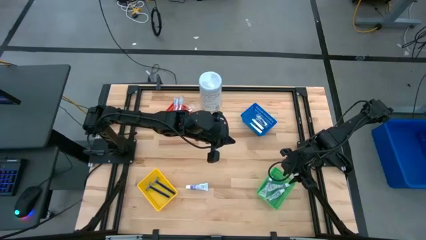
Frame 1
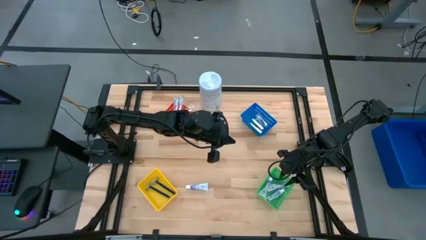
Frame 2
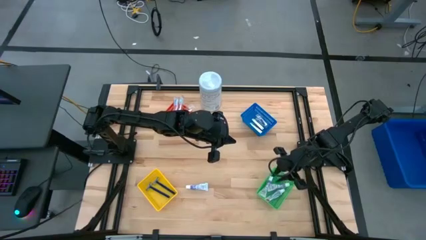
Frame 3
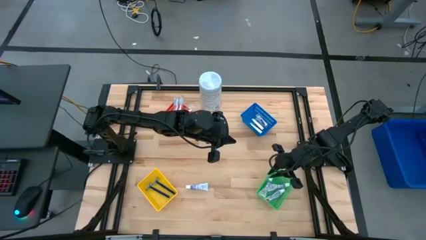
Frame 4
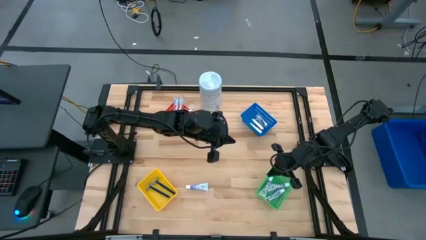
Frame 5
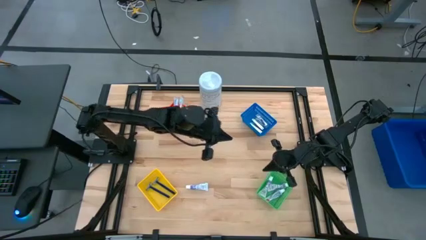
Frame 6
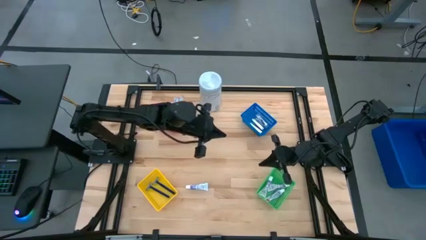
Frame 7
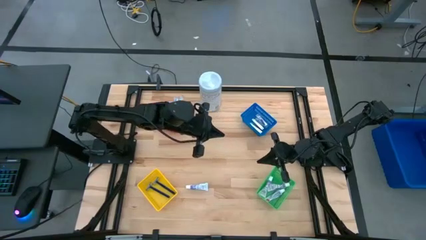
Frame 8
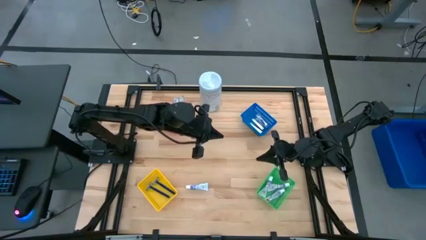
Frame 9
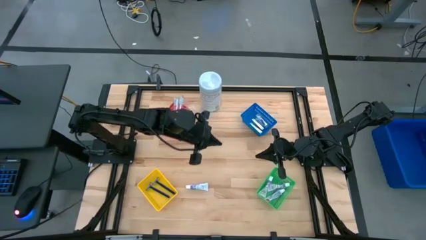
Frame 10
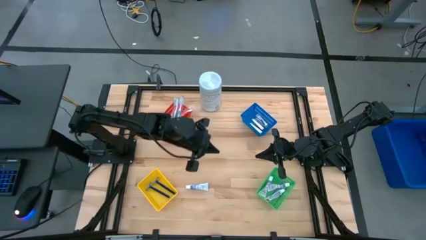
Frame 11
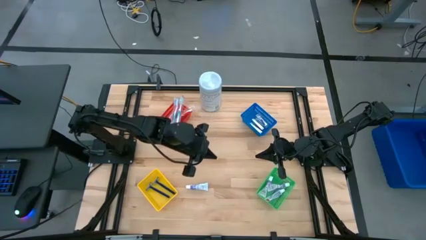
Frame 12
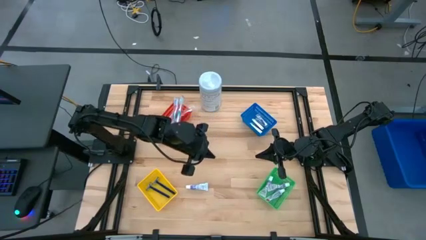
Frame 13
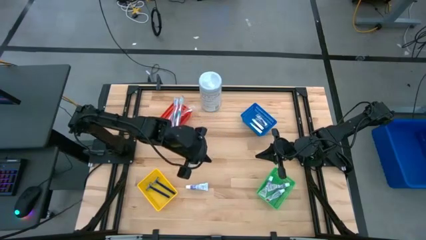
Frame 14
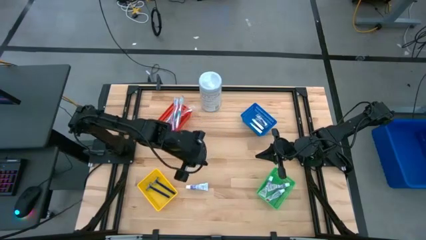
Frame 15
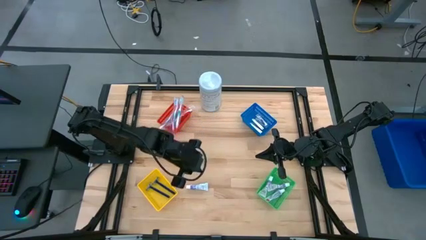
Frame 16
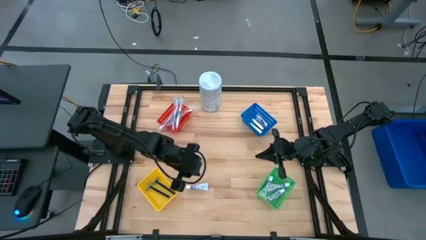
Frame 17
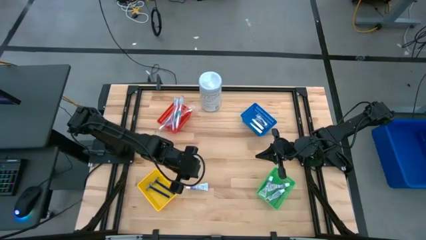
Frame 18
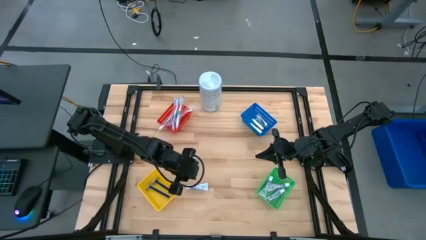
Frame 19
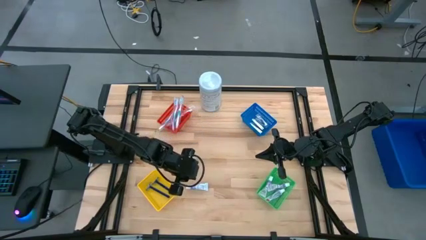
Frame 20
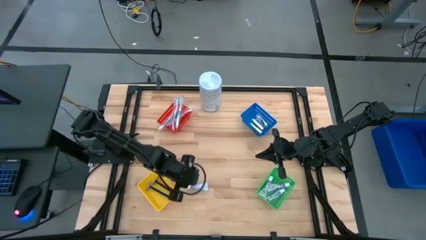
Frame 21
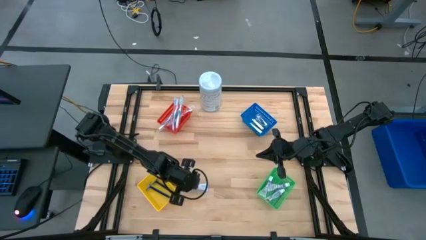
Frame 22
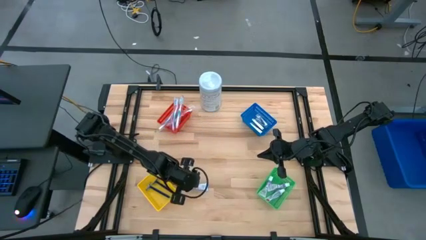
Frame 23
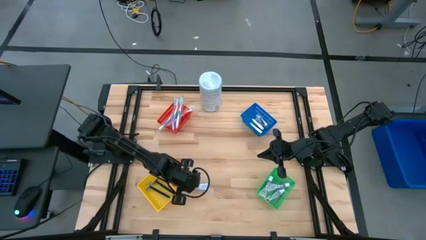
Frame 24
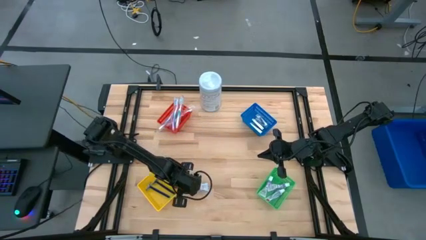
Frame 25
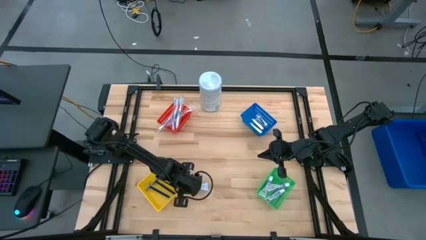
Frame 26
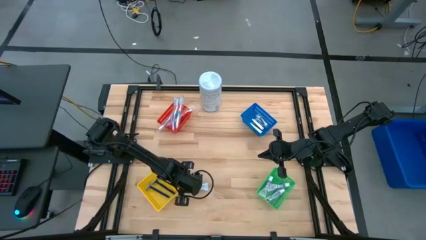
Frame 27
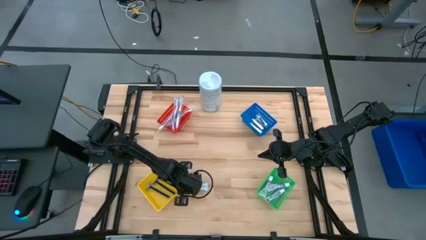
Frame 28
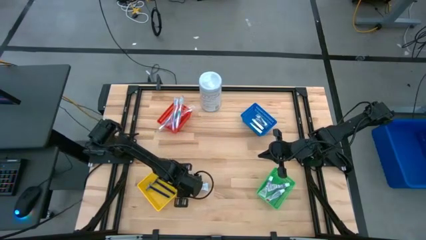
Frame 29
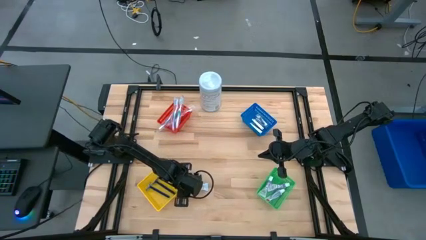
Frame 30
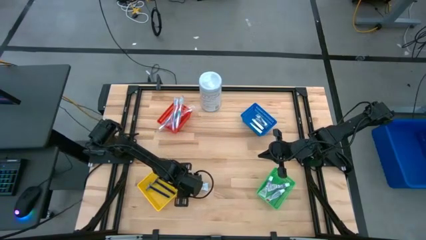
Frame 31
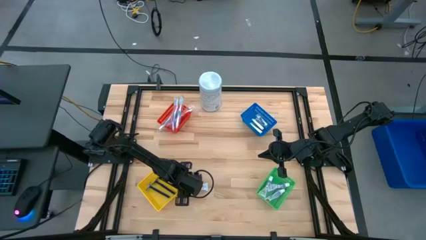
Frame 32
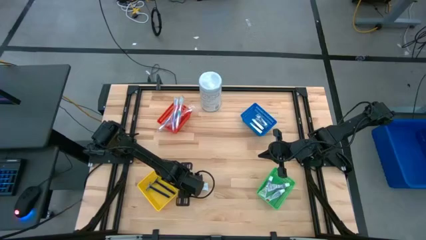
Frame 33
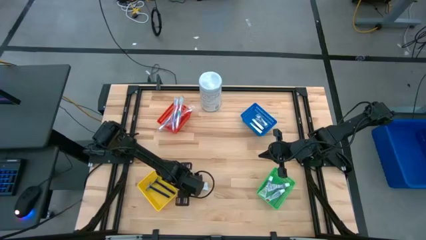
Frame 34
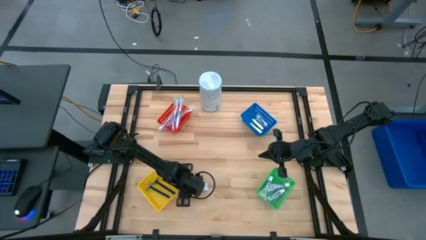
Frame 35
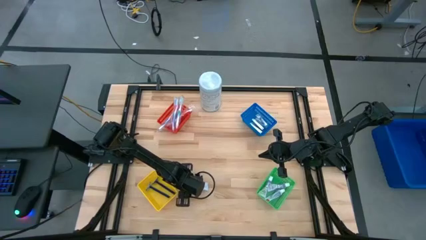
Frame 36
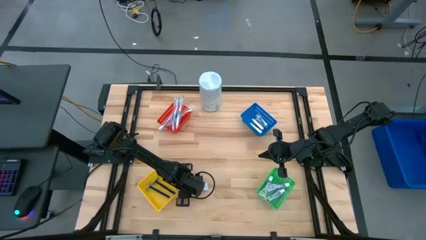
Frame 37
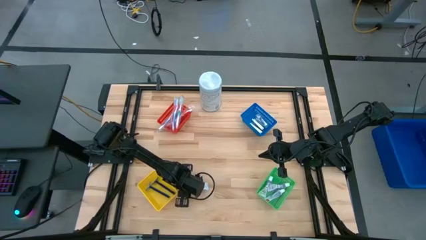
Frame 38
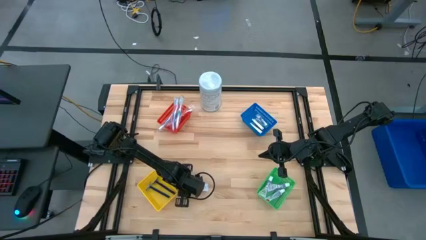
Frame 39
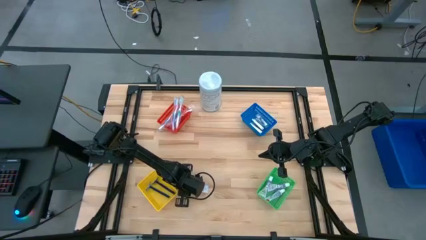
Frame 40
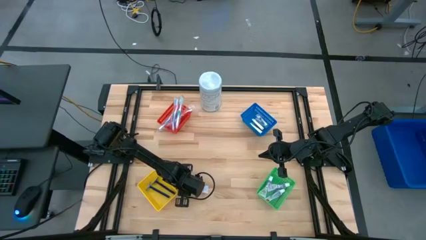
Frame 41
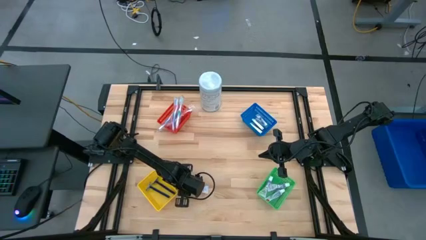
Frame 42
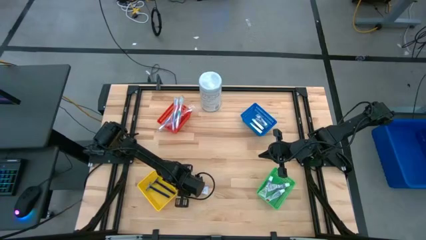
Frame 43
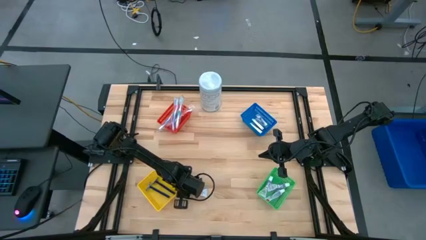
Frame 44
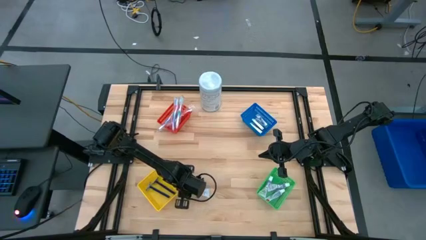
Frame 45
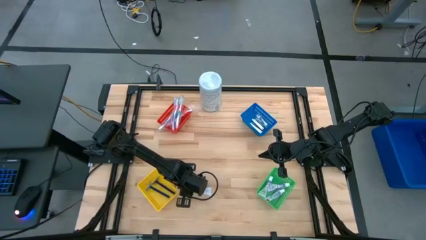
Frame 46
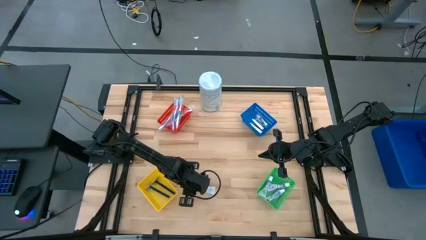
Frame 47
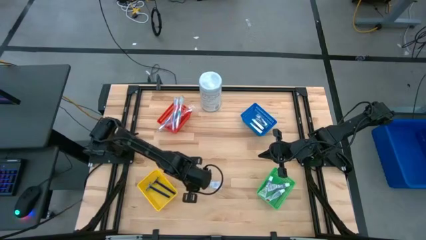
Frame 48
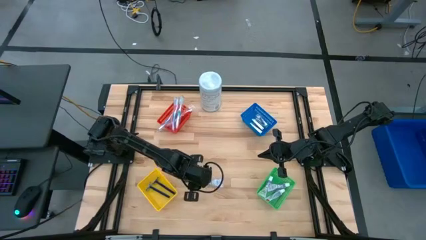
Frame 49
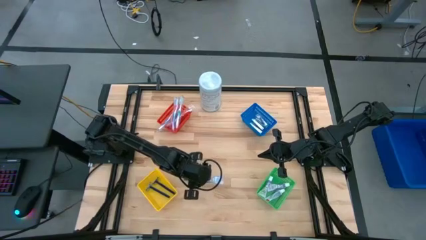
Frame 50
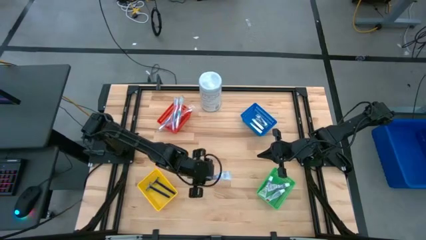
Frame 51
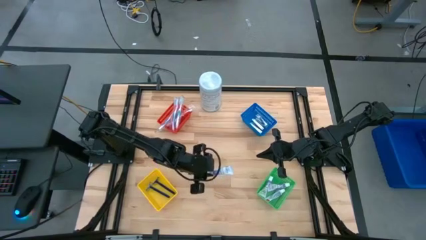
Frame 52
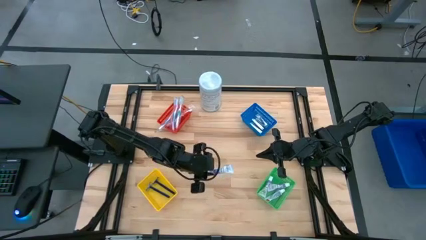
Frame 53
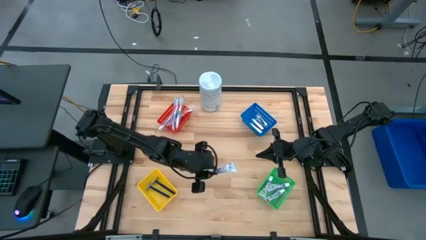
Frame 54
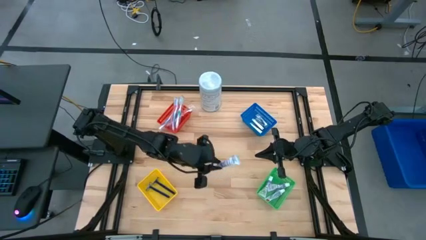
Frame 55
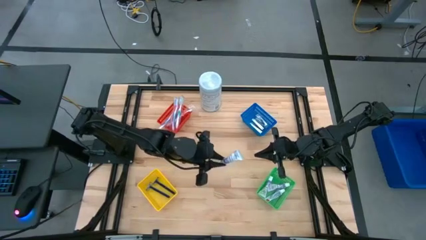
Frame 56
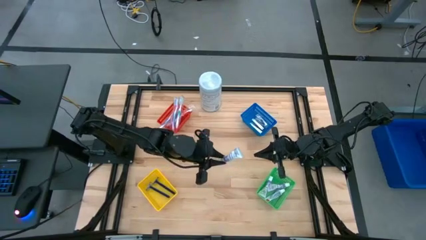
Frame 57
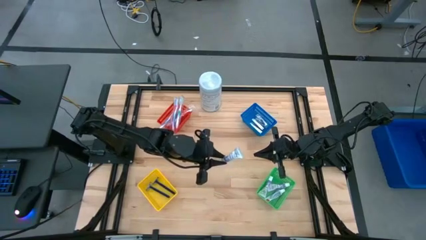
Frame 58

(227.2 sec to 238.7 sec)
Task: Pick & Place Travel size toiletries
Put the white toothpaste into the green basket

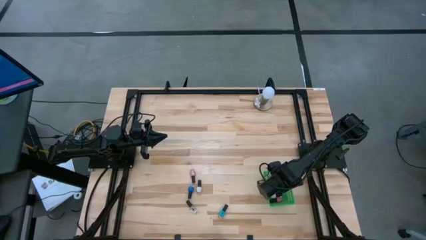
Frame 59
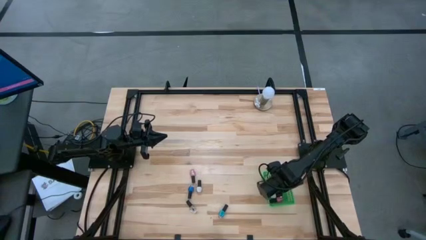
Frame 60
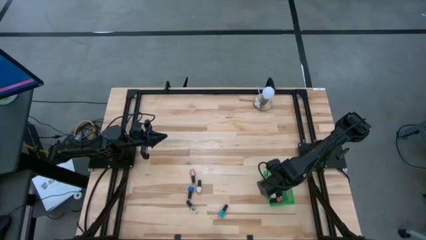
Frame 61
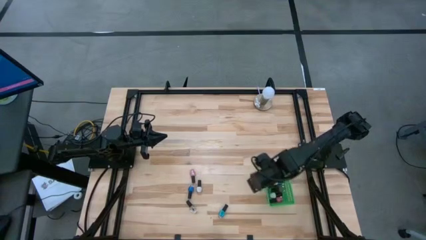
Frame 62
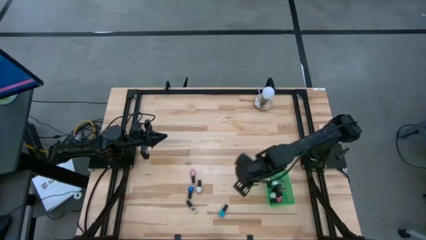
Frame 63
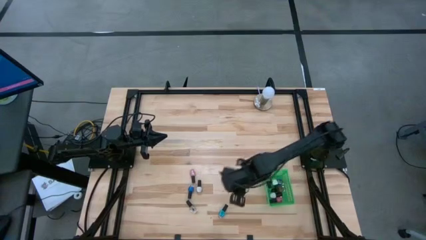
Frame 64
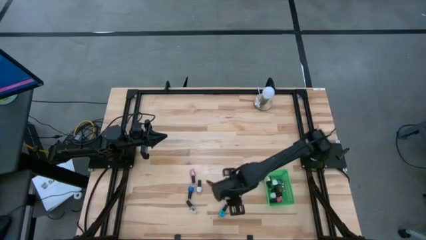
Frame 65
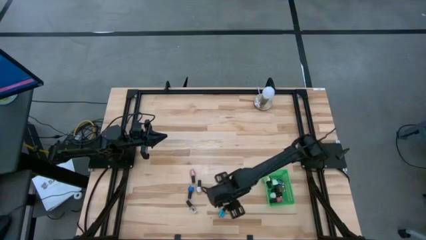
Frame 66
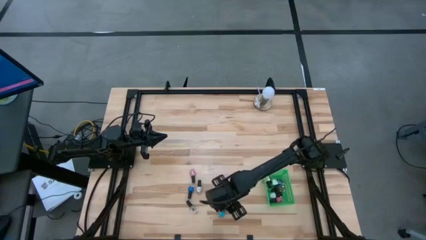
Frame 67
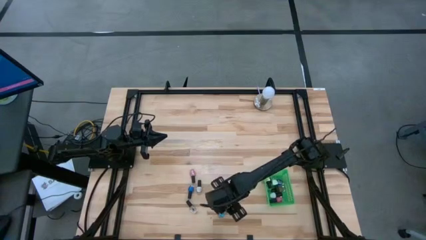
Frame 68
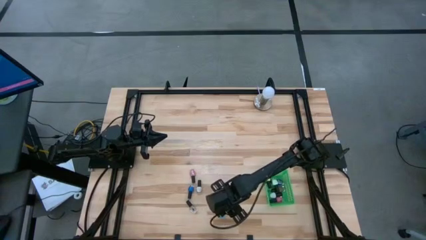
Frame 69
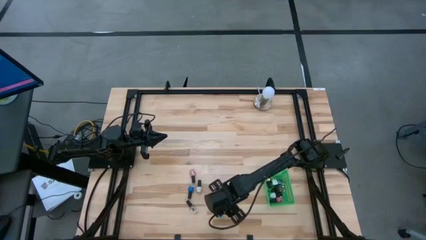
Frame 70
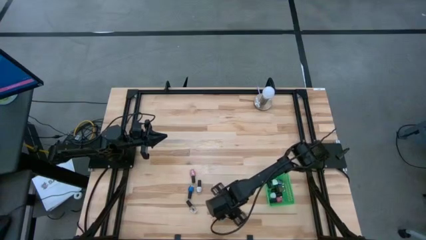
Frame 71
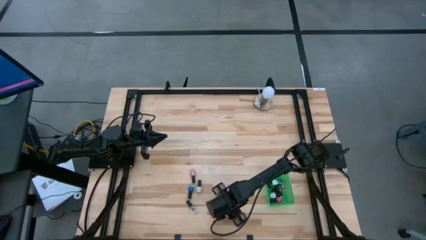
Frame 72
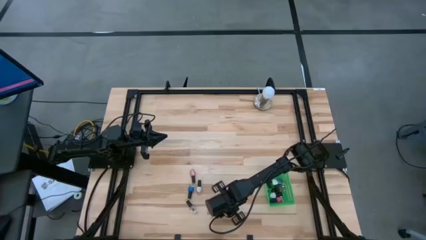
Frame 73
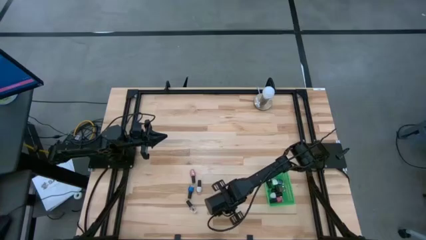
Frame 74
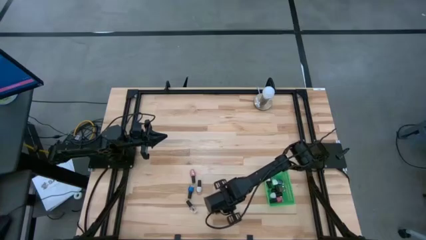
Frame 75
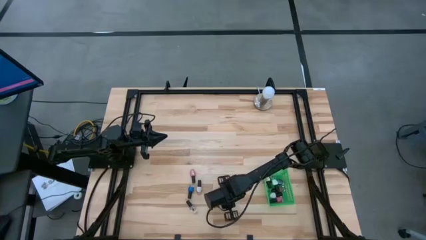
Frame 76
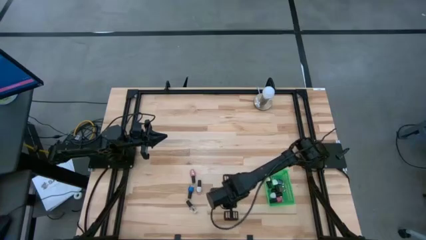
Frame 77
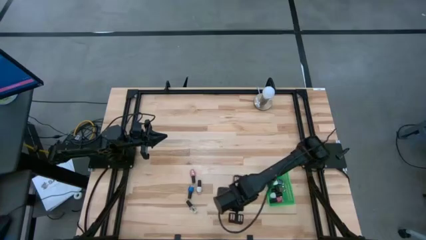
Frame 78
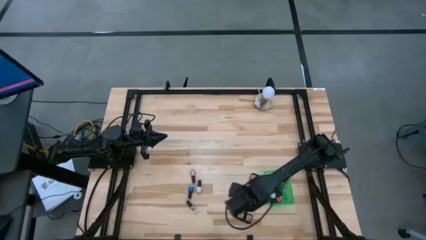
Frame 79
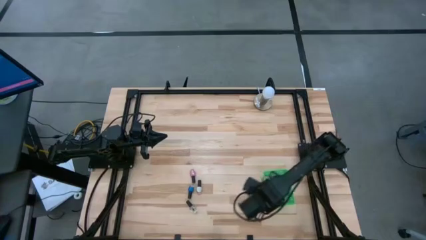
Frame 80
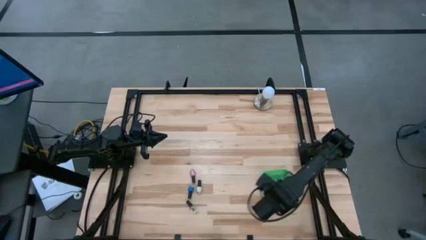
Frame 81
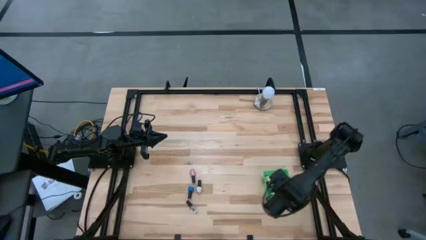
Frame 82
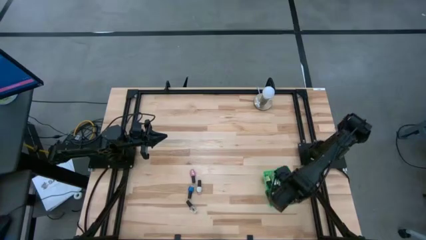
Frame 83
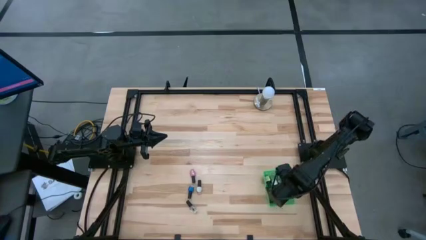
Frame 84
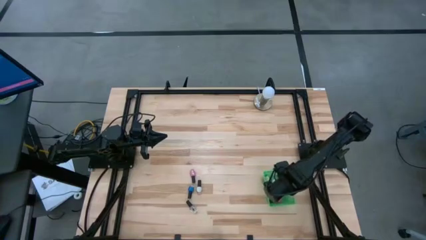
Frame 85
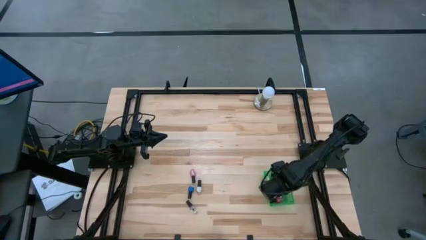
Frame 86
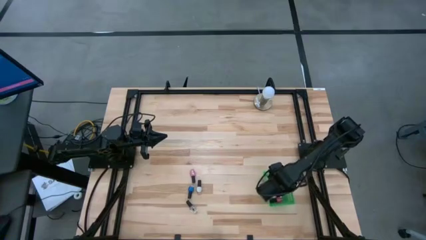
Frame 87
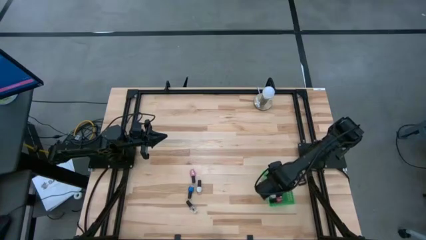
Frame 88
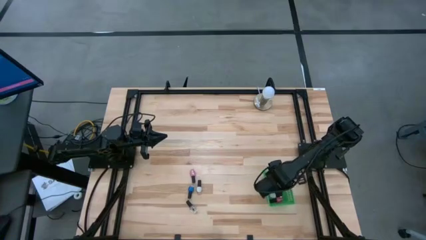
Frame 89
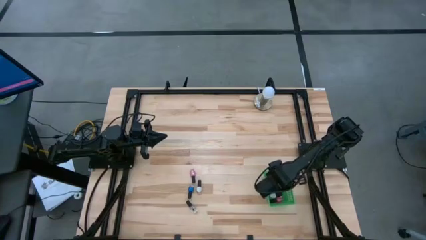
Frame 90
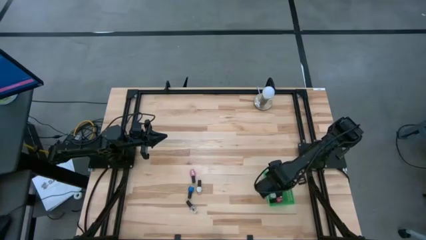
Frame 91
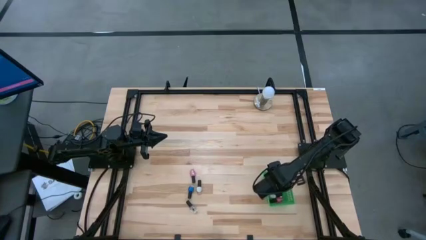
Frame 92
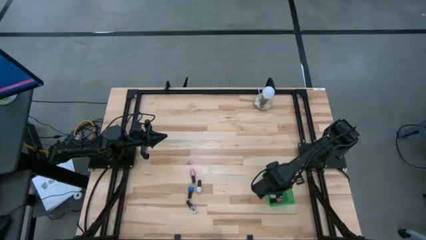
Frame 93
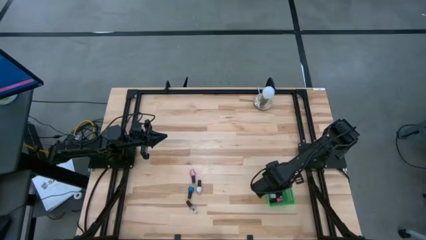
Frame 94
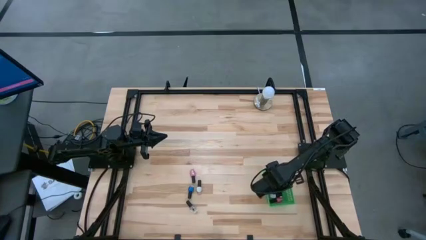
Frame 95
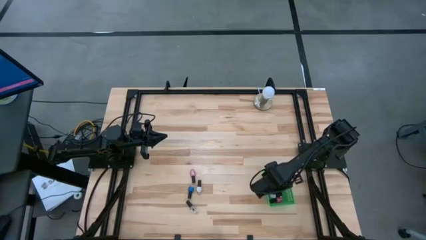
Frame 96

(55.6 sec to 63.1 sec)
Task: Pick & Place Nail Polish
Put the light blue nail polish into the green bin
